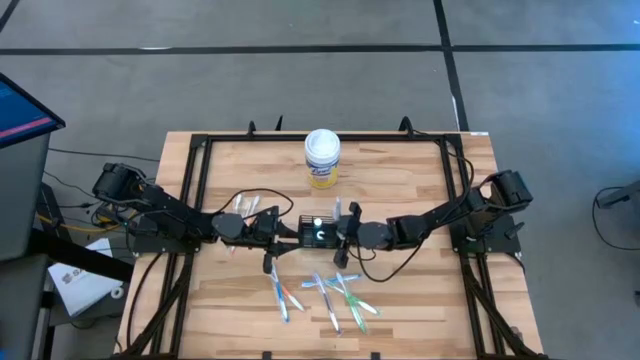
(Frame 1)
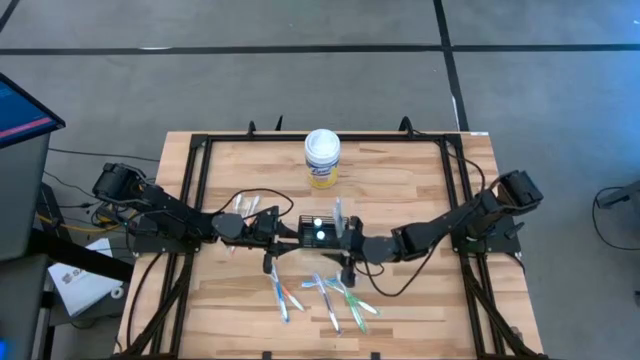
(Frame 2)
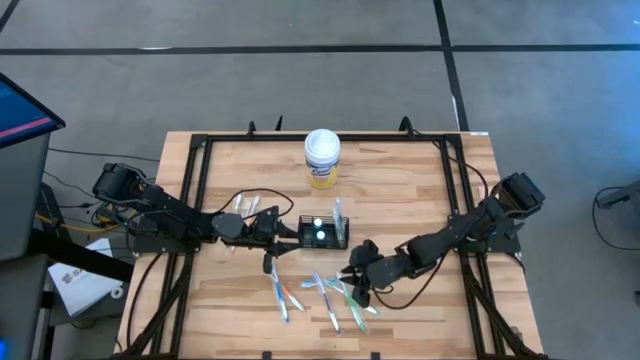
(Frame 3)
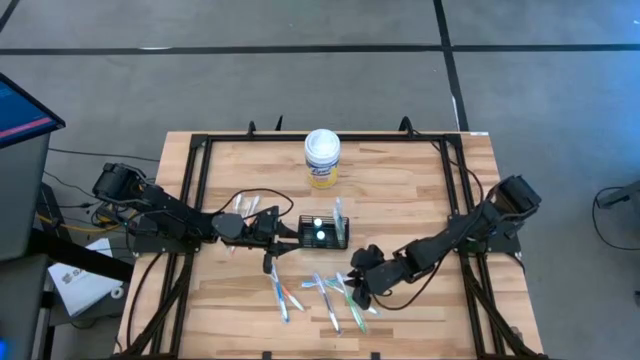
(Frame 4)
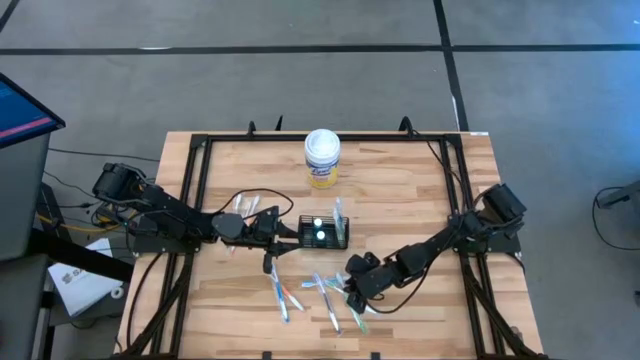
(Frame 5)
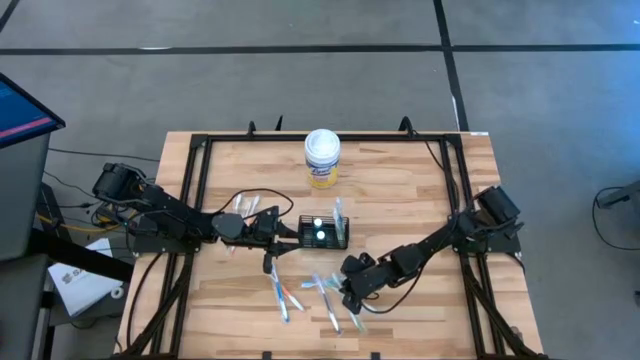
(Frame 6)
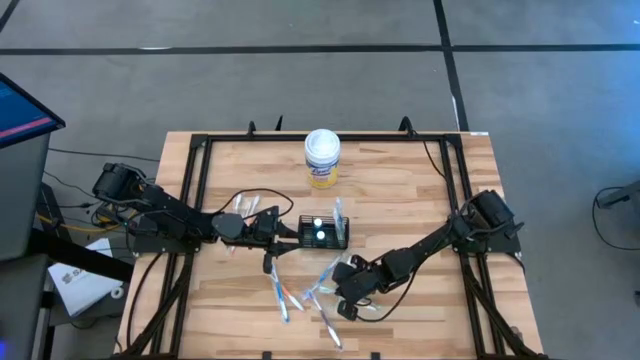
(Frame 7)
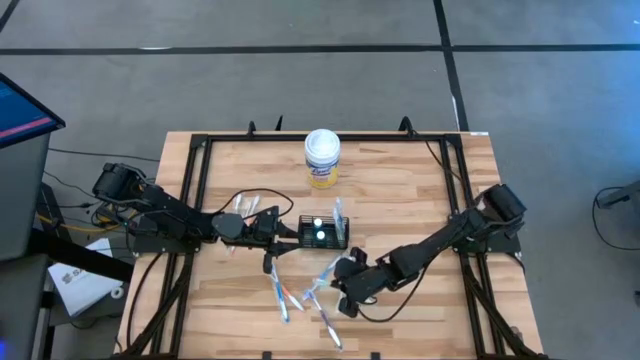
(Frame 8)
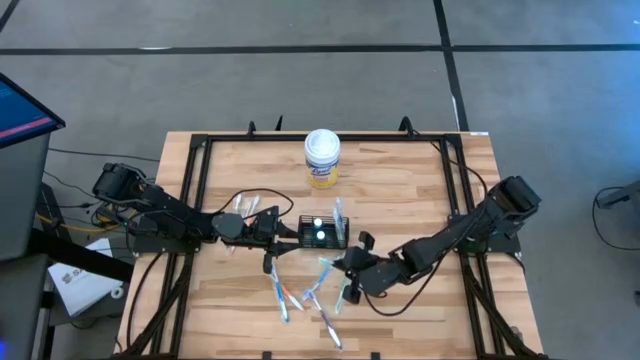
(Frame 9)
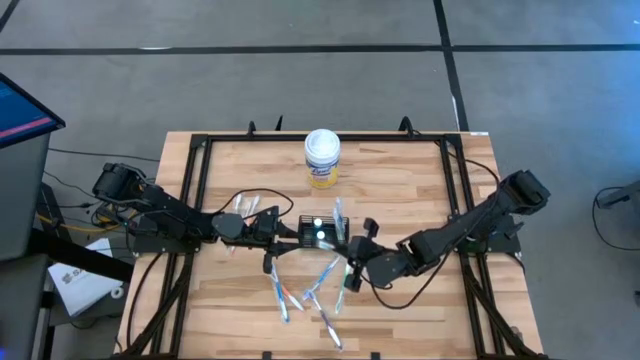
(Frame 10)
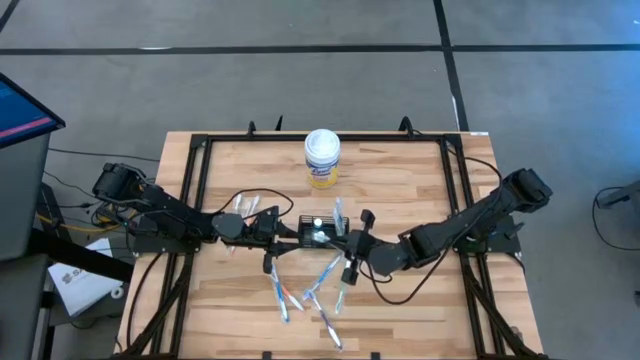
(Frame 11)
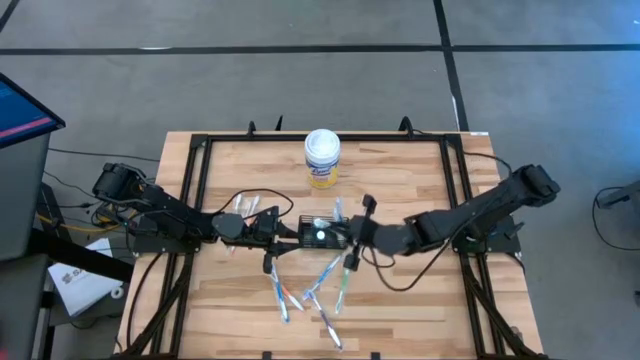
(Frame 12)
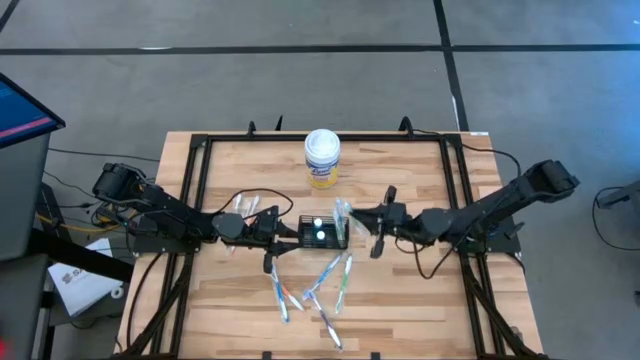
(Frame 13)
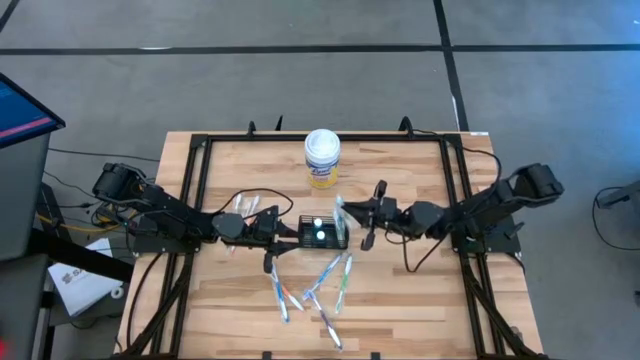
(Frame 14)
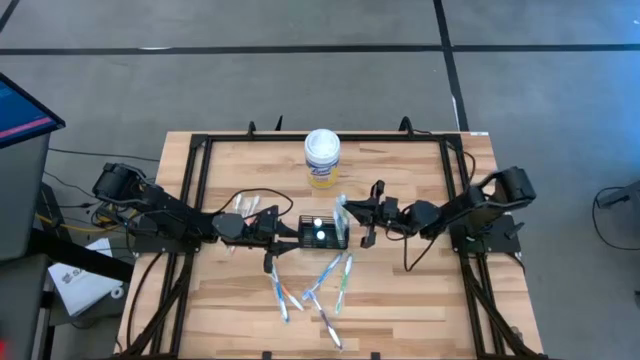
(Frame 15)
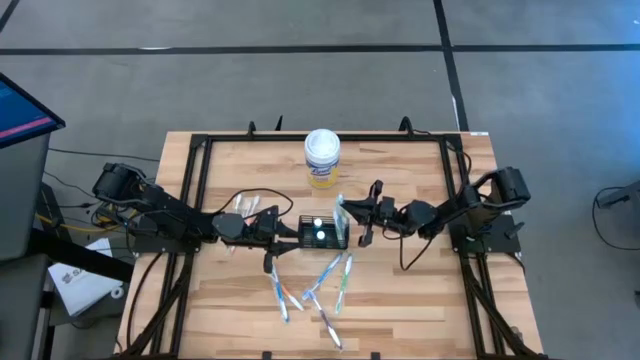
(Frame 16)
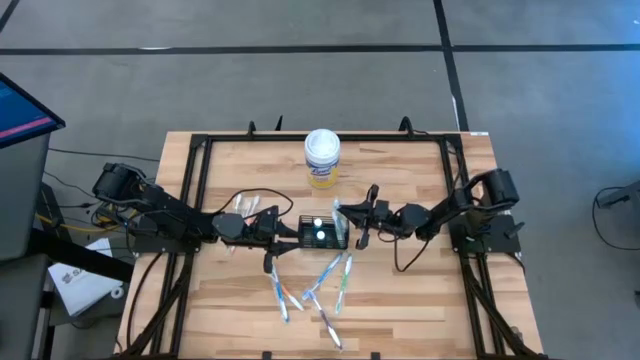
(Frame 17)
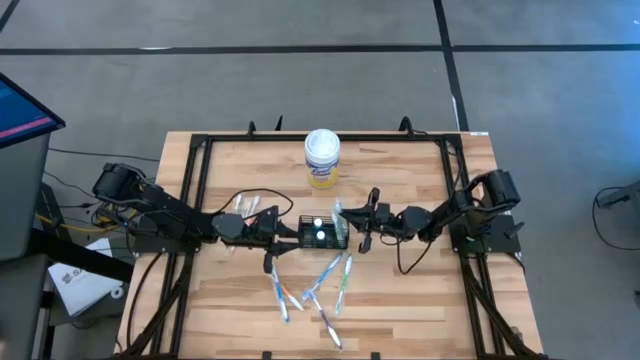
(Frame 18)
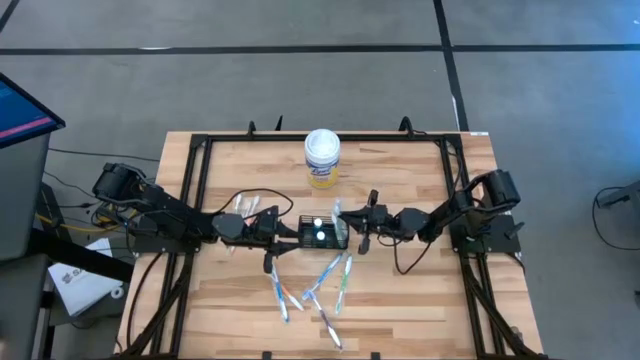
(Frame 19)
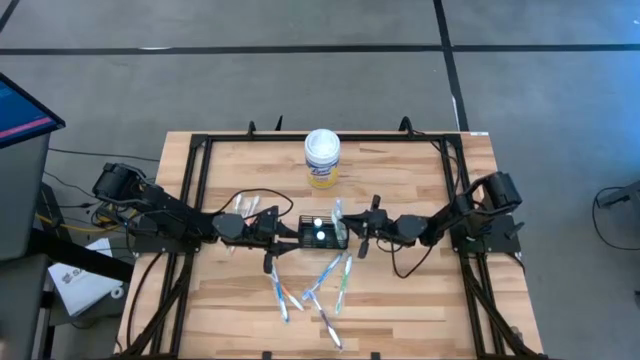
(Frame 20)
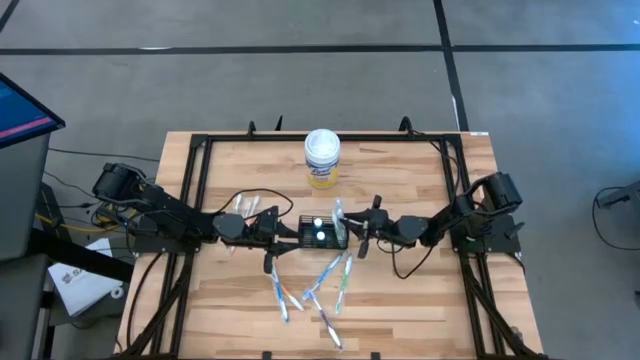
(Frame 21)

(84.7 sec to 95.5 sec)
Task: Pick & Place toothbrushing station
Put the left green toothbrush into the black mesh organizer

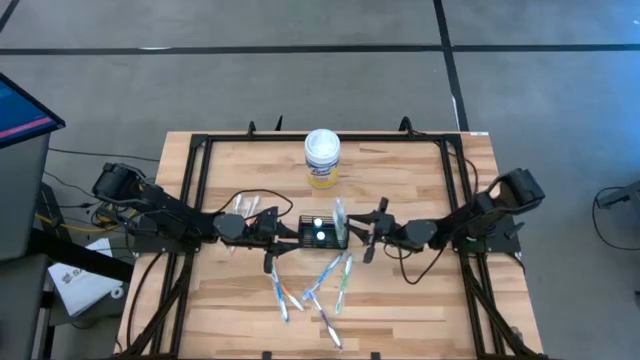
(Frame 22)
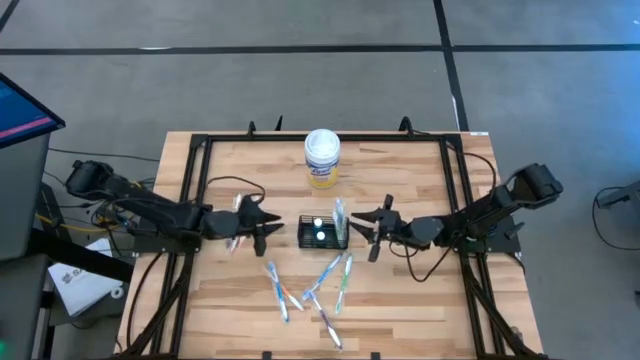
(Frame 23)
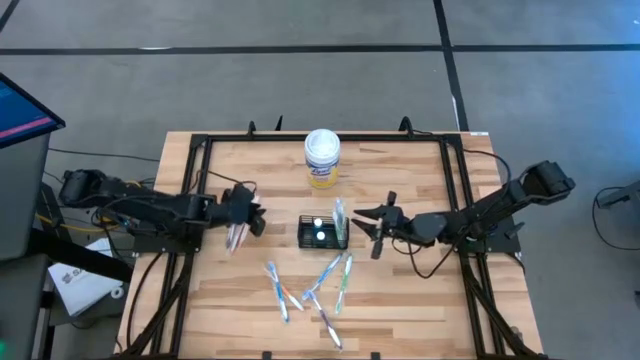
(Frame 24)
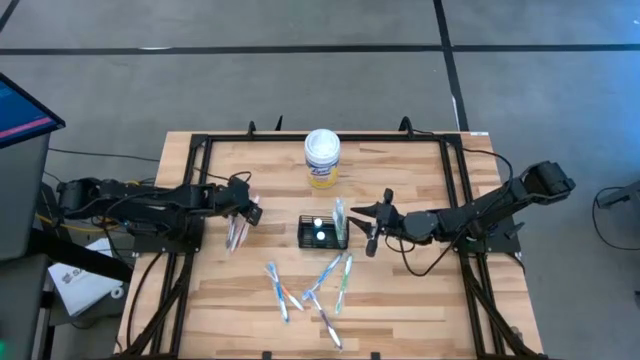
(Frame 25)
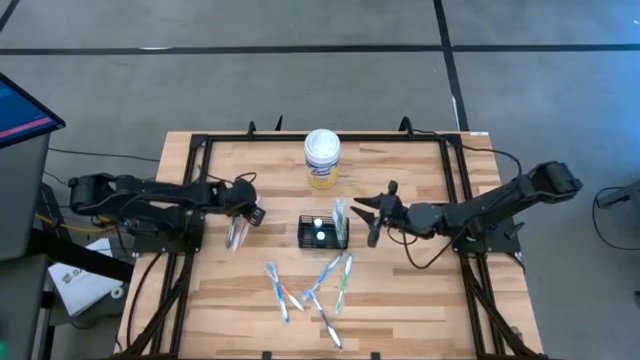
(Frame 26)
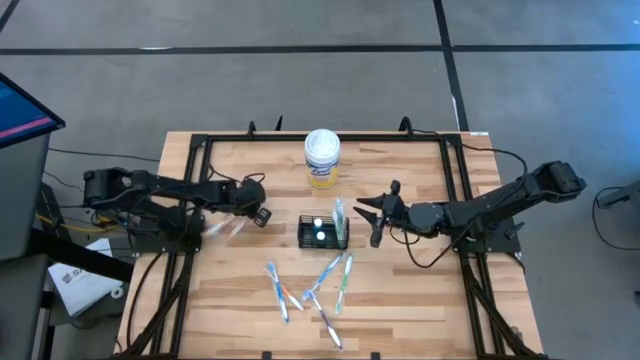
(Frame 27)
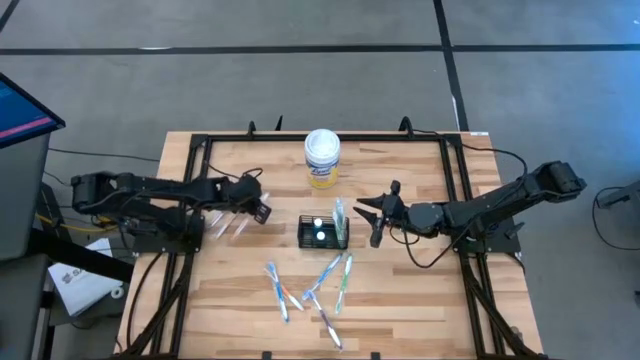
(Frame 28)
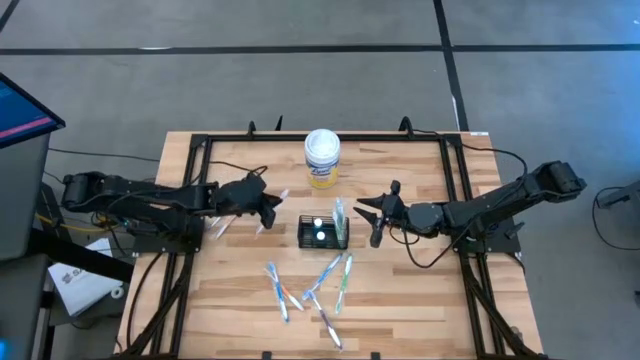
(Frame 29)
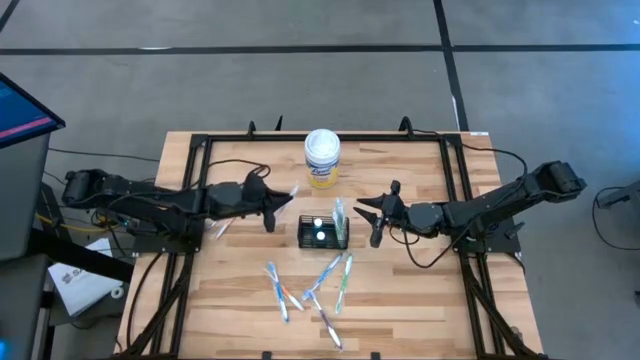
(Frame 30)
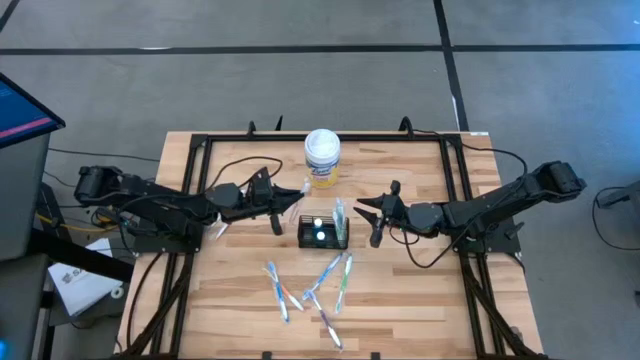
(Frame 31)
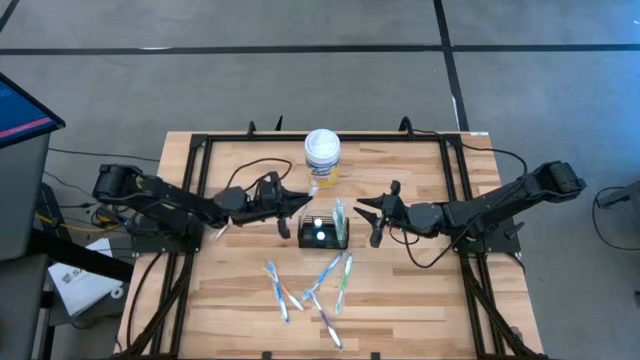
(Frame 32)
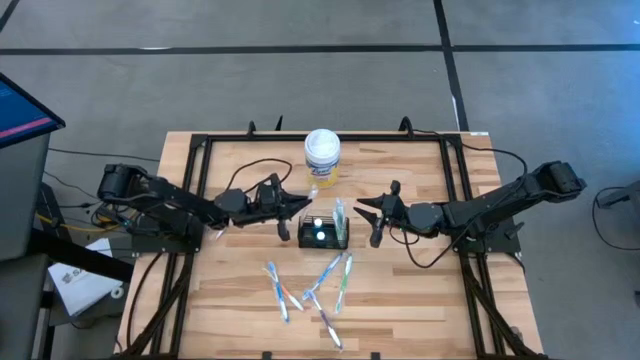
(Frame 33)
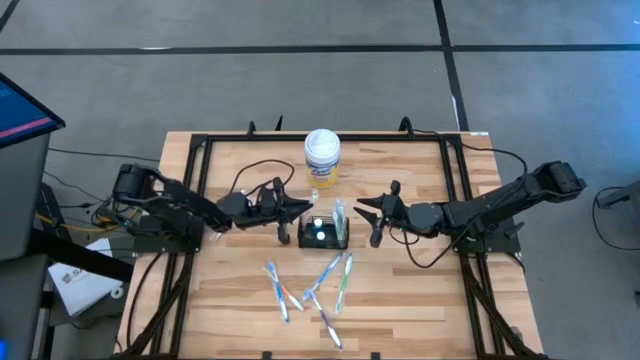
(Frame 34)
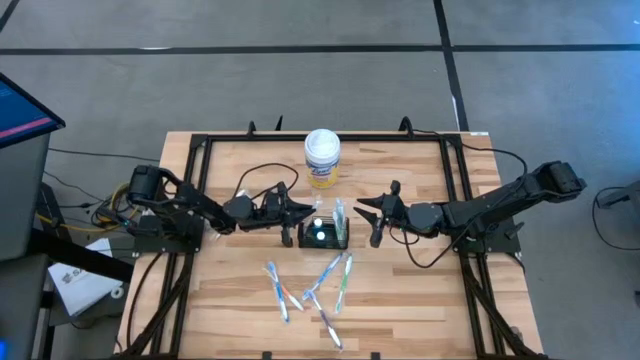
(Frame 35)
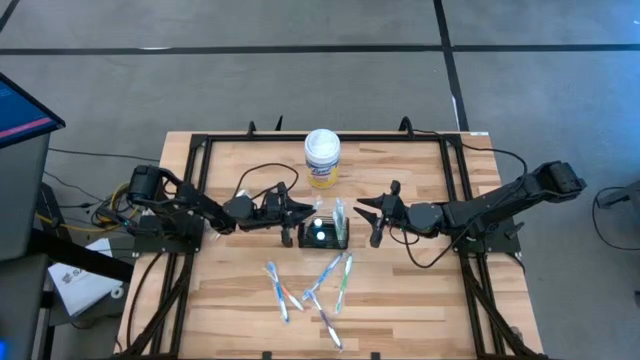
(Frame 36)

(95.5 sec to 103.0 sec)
Put the top right orange toothbrush into the black mesh organizer

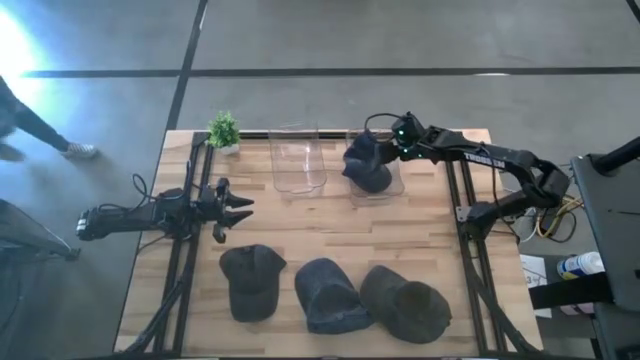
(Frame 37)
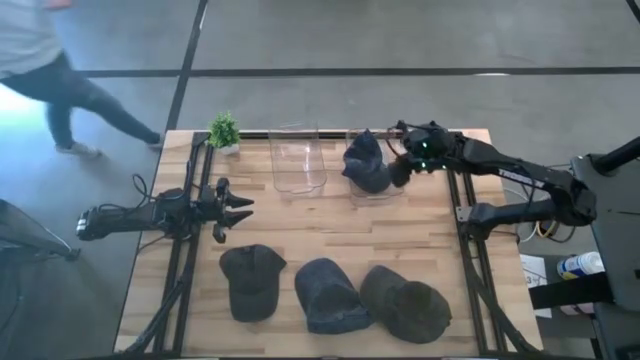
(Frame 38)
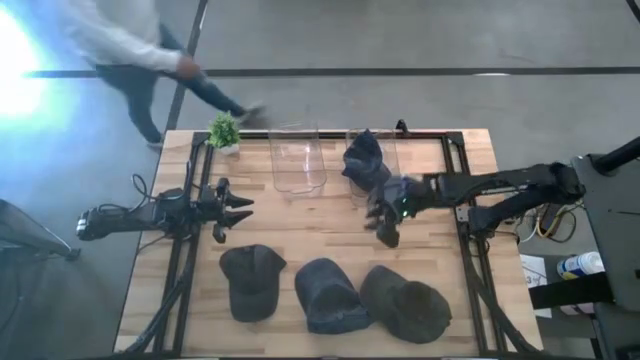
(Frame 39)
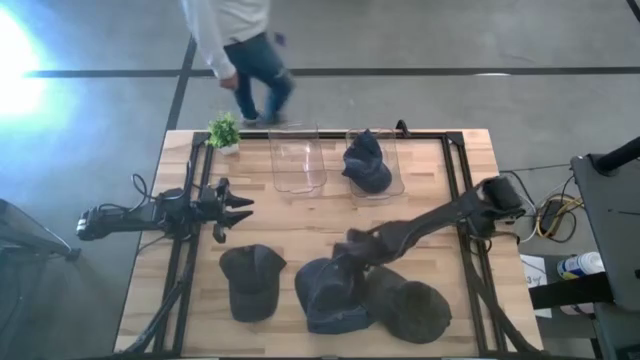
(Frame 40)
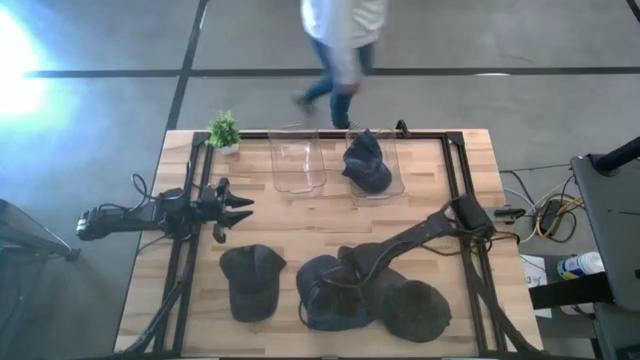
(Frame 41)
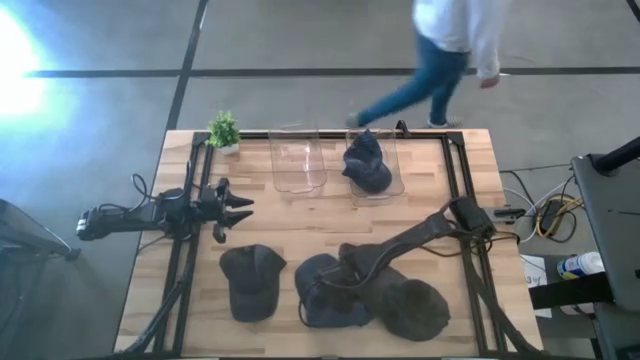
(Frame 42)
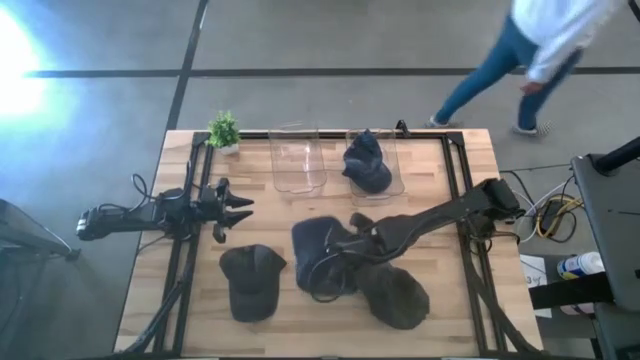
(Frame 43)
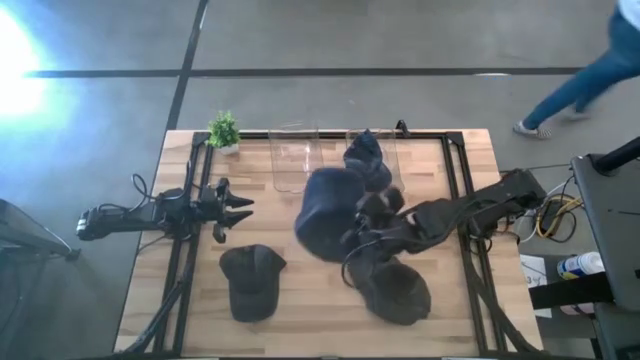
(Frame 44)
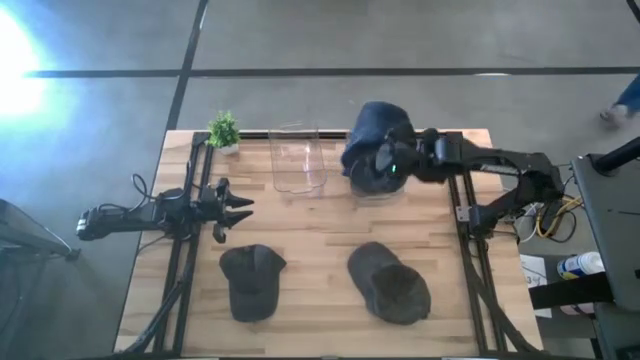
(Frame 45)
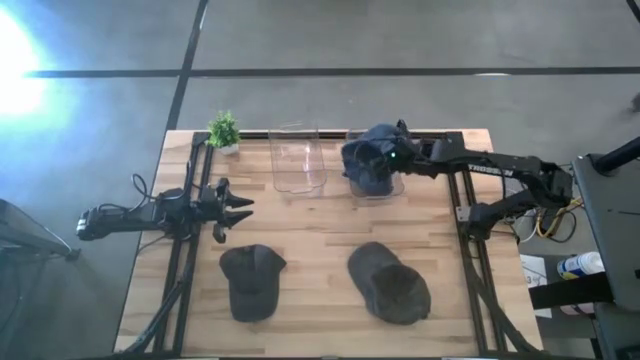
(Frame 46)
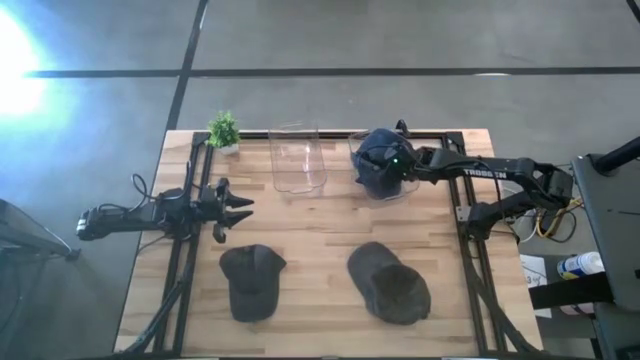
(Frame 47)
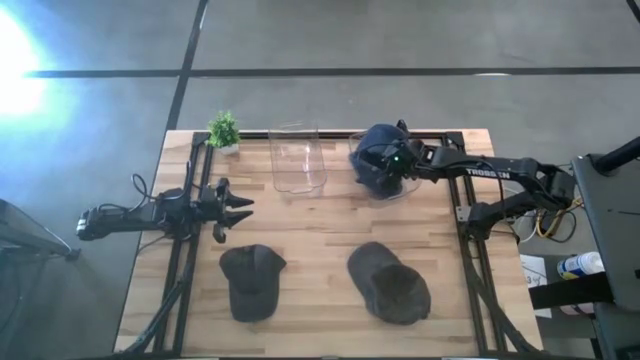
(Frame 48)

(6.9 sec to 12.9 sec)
Task: Pick & Place hat
Put the blue cap into the right transparent bin
